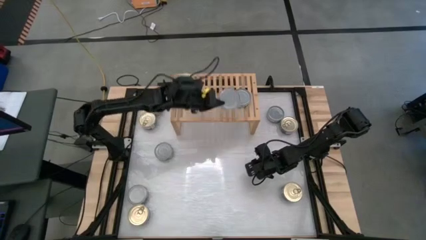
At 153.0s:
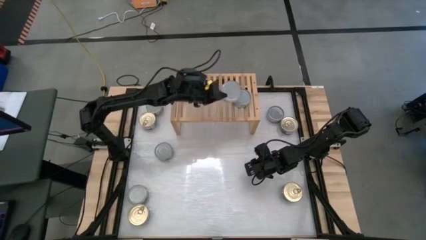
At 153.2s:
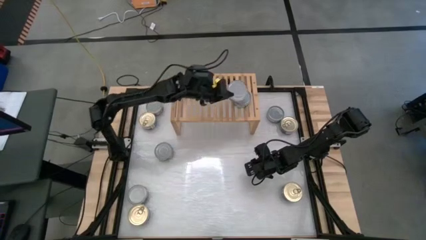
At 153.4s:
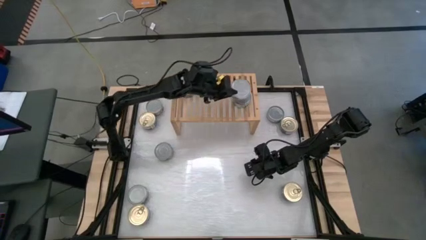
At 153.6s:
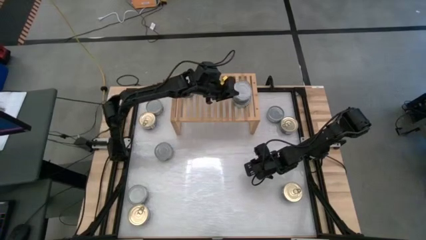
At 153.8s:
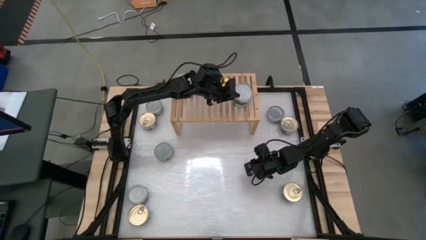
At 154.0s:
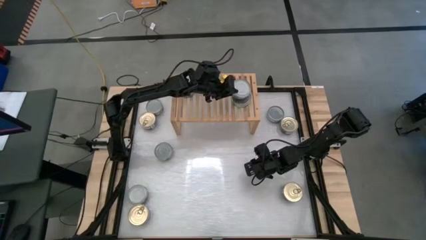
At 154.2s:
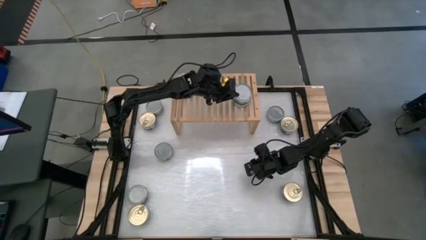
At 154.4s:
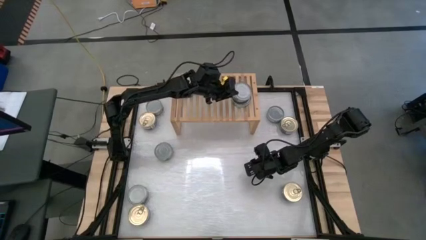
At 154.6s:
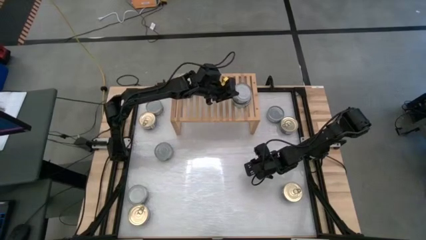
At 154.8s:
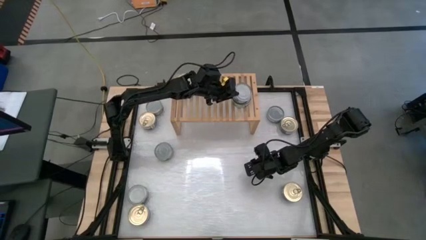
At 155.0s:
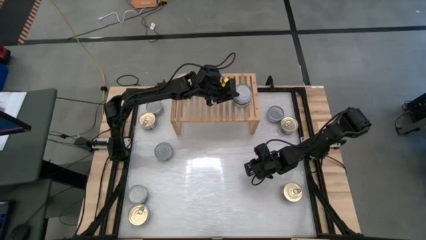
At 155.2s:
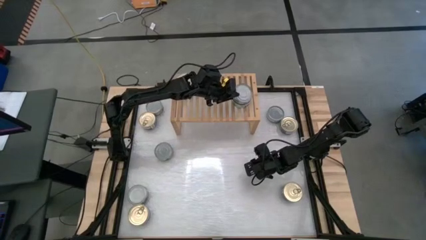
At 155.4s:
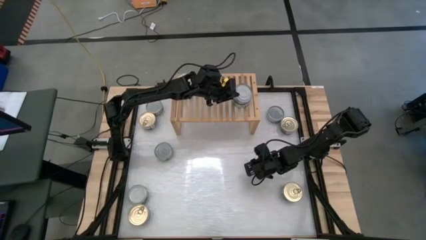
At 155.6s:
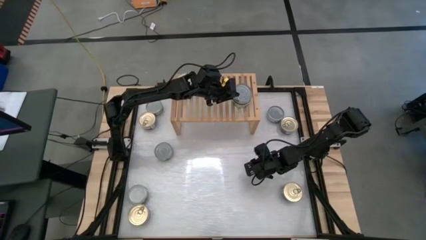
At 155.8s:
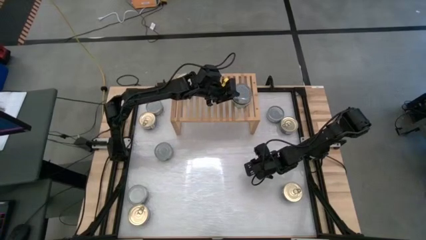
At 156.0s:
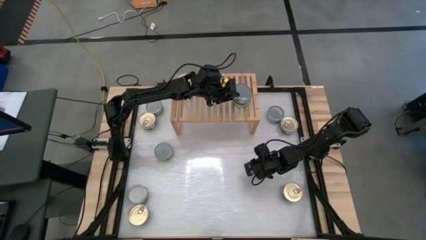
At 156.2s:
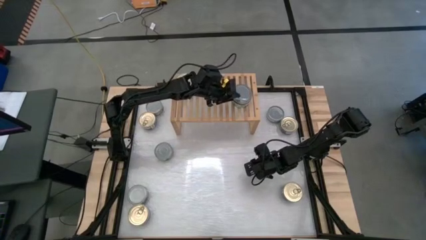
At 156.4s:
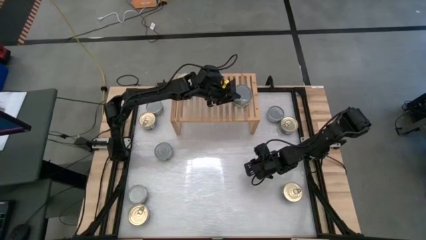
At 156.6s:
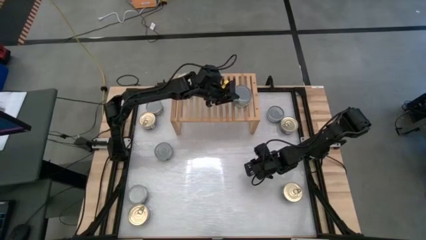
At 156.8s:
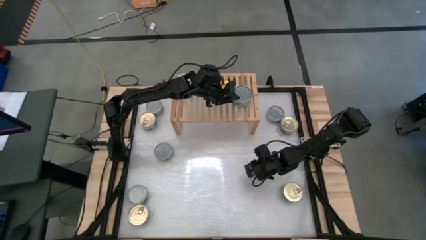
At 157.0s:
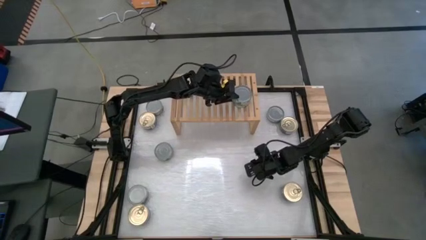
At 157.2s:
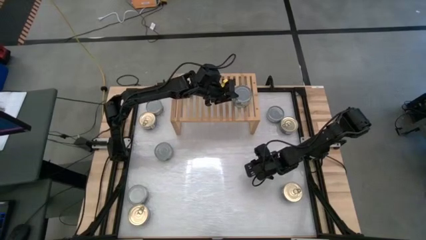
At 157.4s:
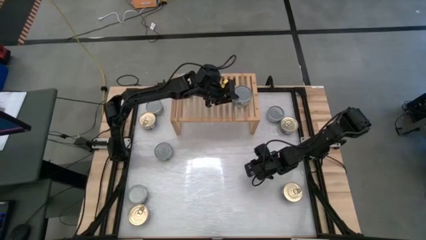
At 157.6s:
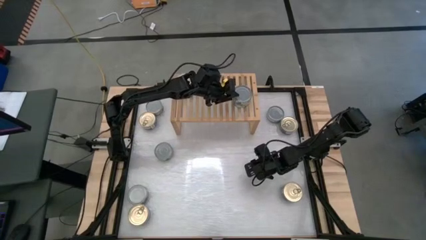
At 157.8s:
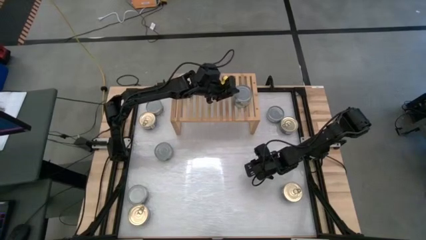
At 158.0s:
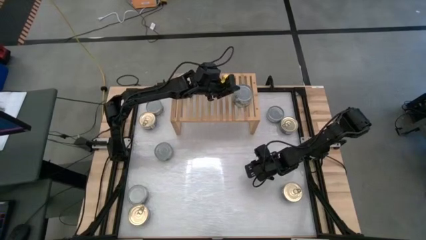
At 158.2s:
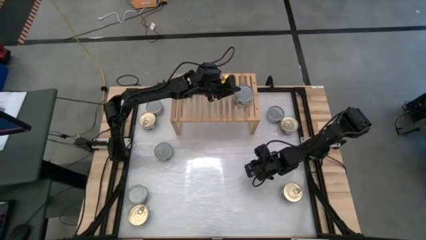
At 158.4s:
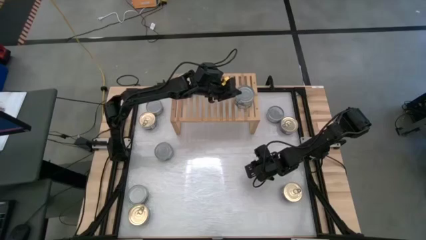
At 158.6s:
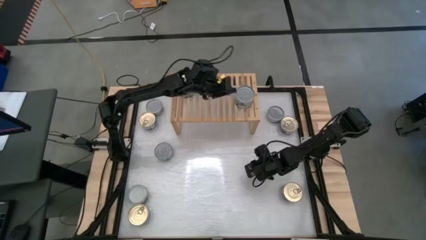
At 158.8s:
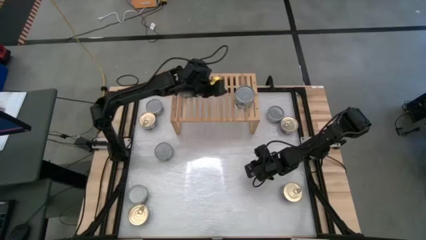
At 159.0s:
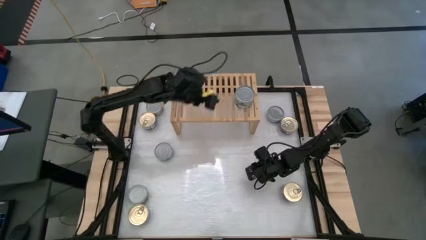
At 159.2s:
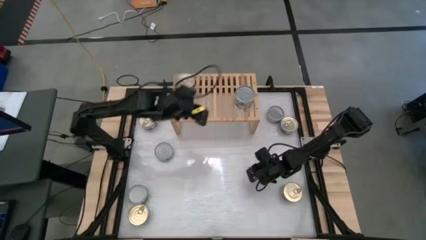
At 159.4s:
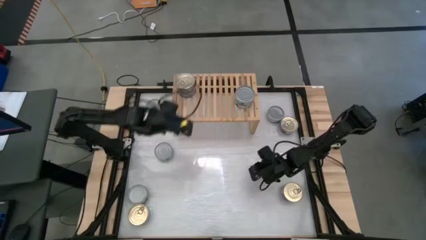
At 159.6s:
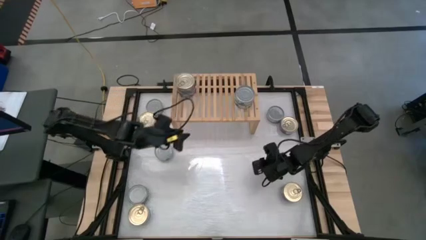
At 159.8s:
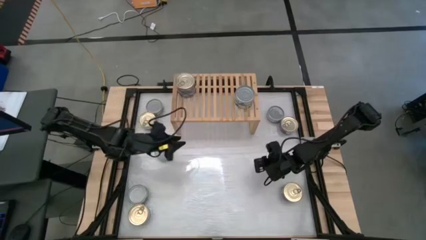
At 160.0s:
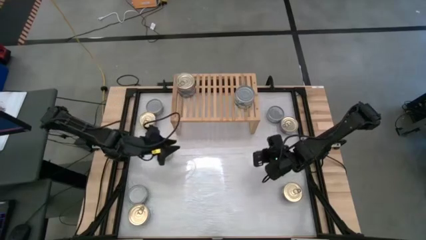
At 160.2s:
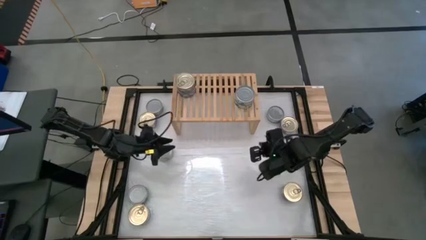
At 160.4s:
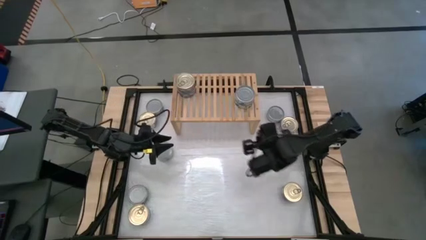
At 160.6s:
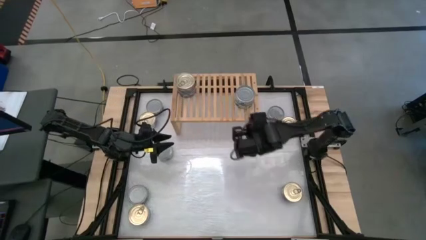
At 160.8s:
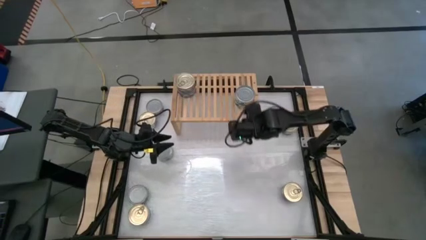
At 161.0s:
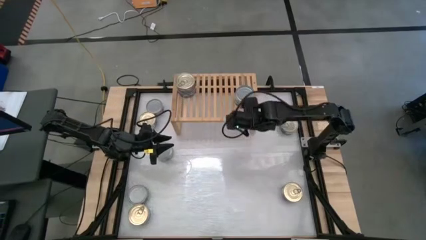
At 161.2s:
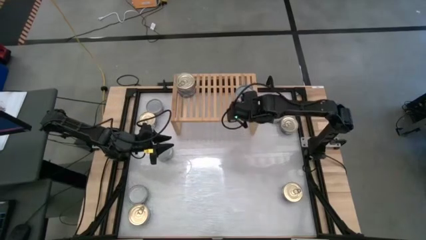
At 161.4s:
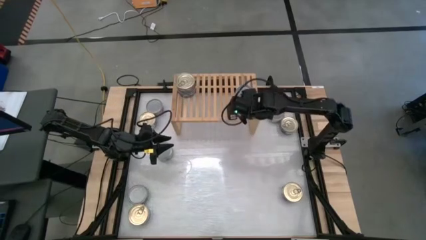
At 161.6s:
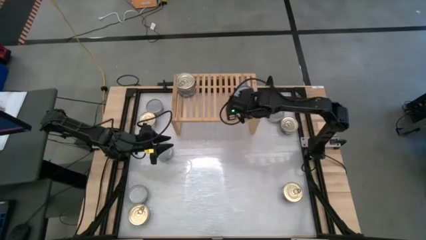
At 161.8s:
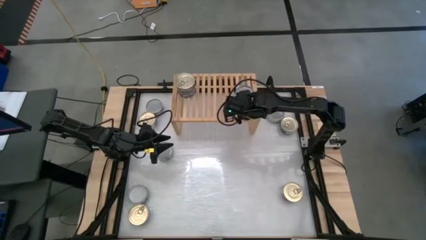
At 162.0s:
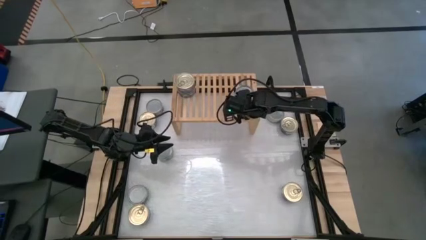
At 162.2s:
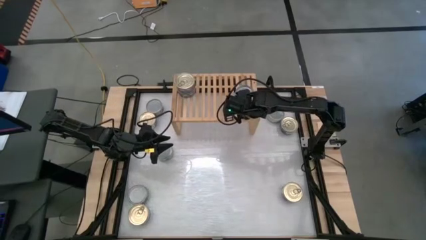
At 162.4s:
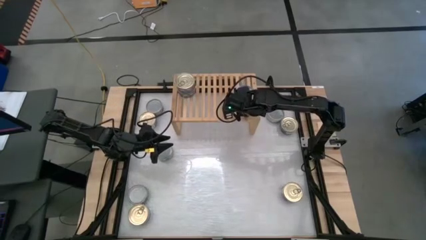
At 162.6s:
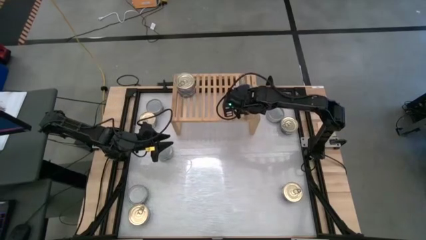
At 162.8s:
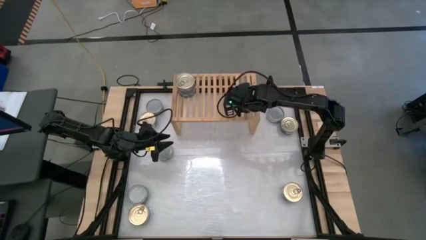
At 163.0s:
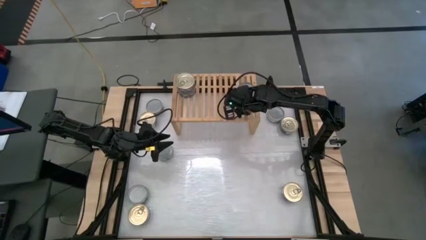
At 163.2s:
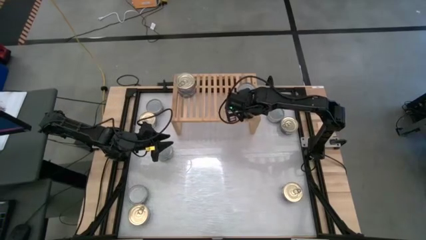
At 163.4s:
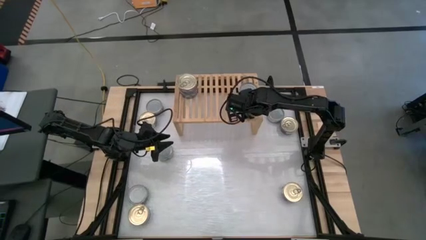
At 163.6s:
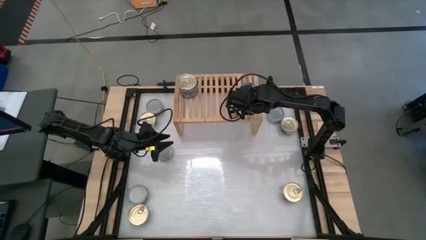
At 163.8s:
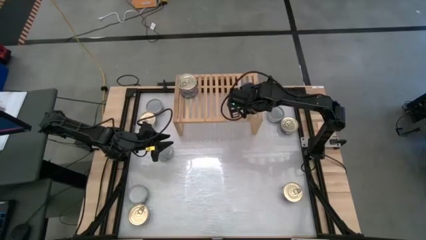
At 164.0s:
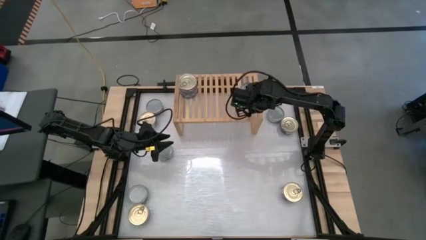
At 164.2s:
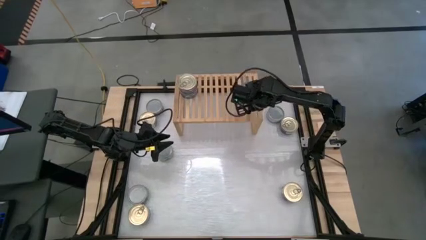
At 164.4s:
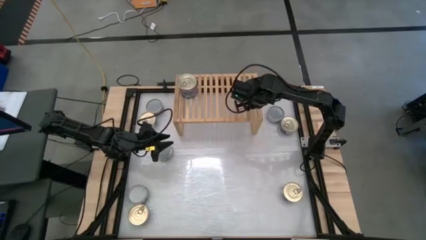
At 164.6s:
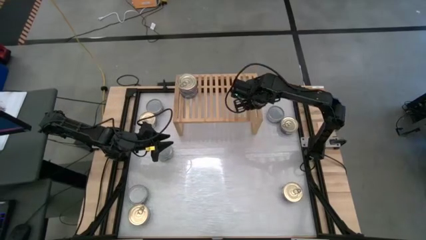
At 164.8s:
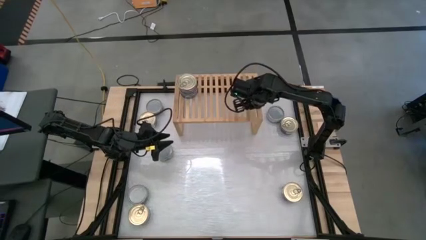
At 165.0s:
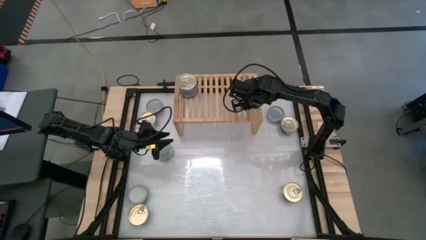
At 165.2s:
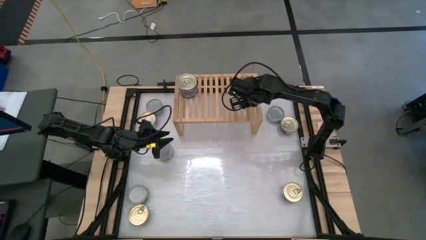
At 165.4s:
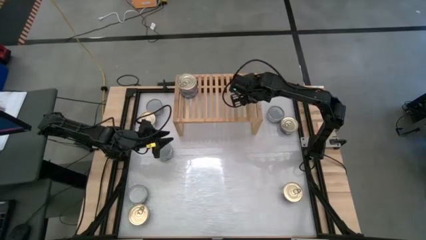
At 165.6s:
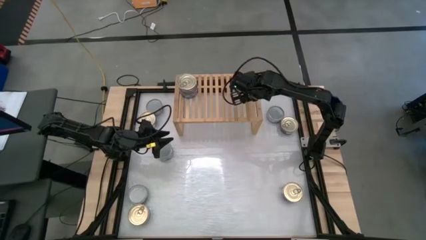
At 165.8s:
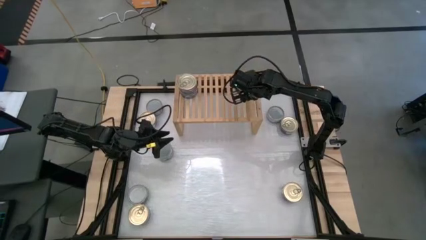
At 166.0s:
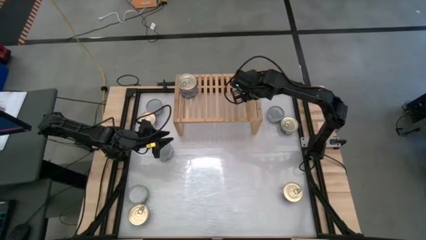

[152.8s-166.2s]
Task: Stack canned seafood by type on shelf
Stack the green tuna can on top of the other green tuna can on the shelf
